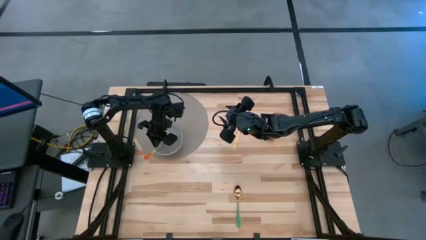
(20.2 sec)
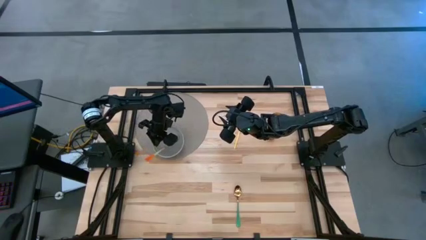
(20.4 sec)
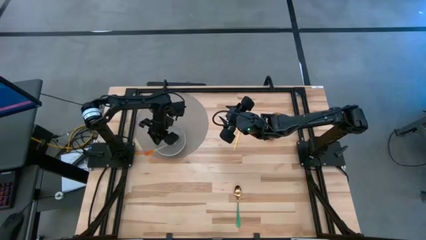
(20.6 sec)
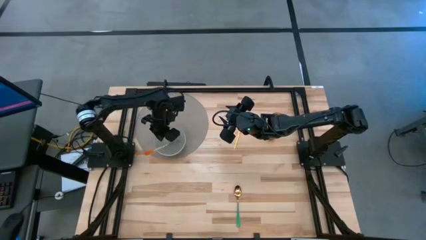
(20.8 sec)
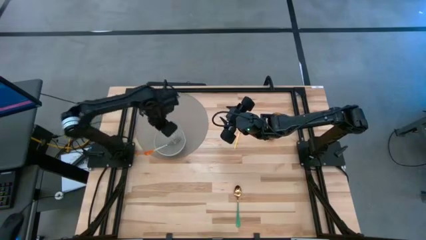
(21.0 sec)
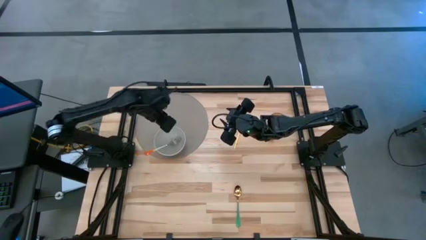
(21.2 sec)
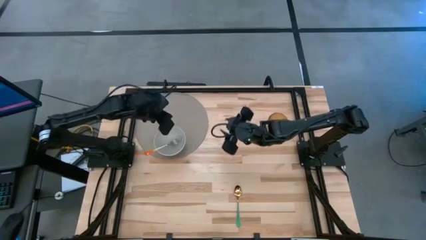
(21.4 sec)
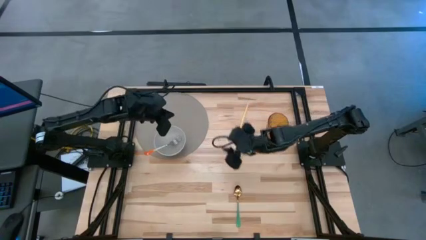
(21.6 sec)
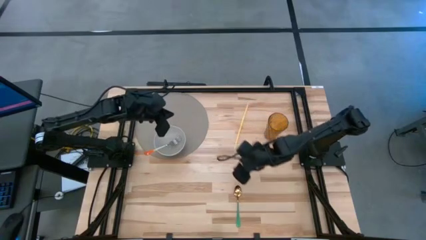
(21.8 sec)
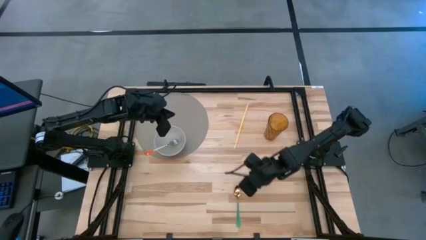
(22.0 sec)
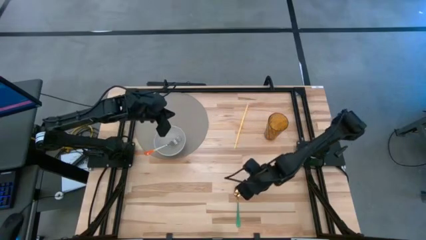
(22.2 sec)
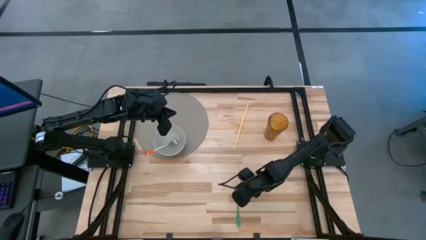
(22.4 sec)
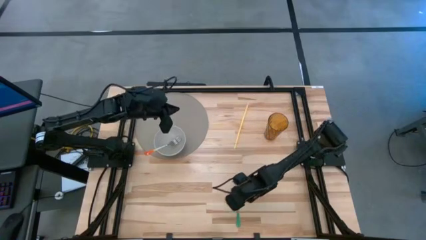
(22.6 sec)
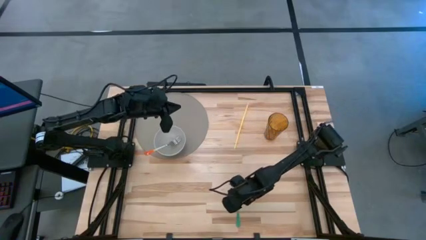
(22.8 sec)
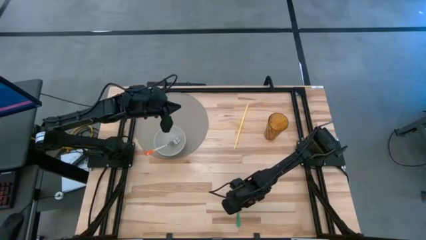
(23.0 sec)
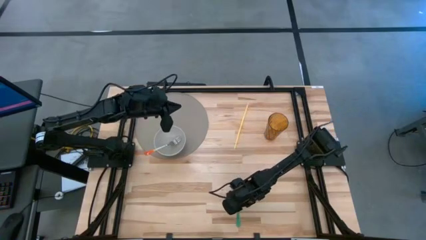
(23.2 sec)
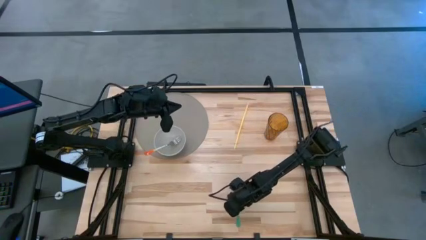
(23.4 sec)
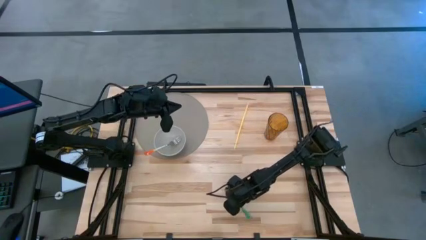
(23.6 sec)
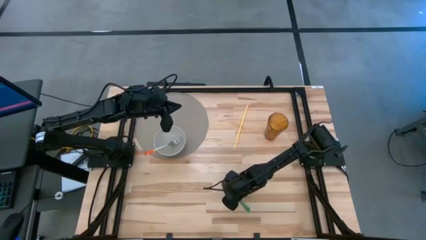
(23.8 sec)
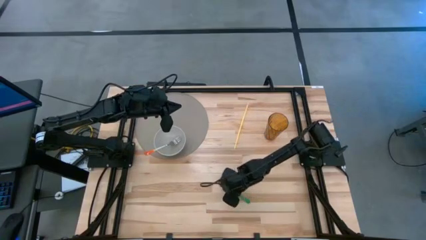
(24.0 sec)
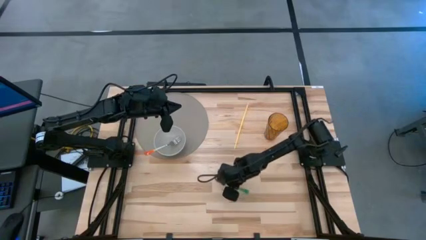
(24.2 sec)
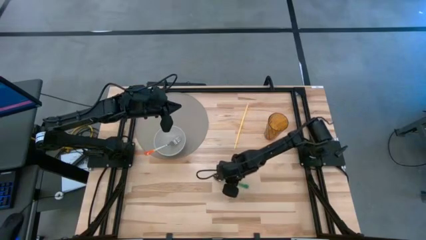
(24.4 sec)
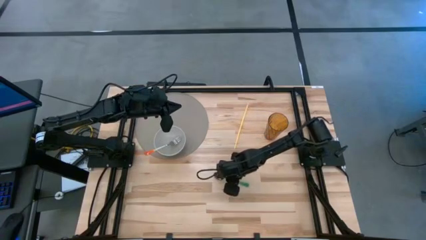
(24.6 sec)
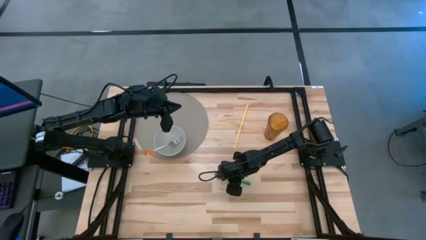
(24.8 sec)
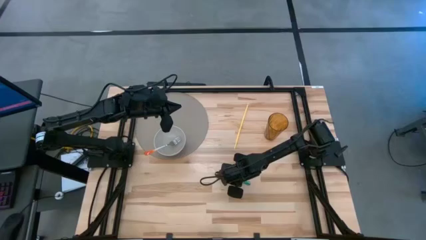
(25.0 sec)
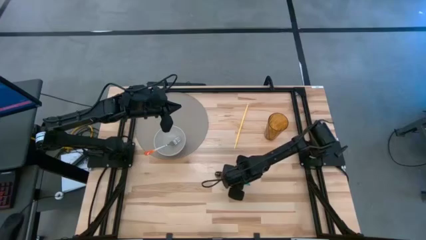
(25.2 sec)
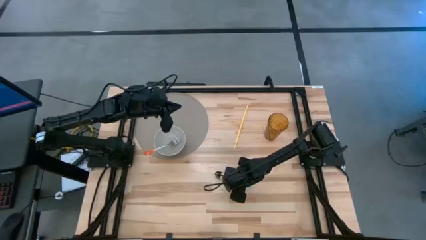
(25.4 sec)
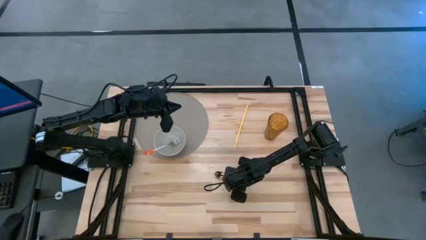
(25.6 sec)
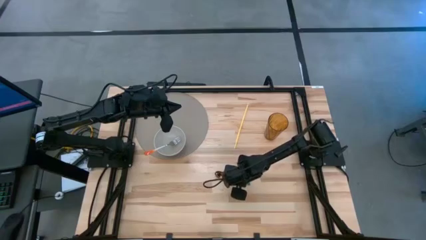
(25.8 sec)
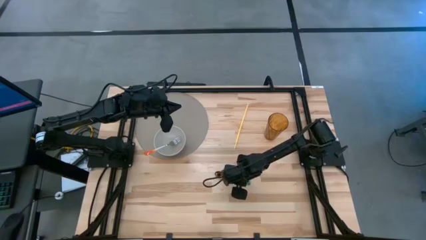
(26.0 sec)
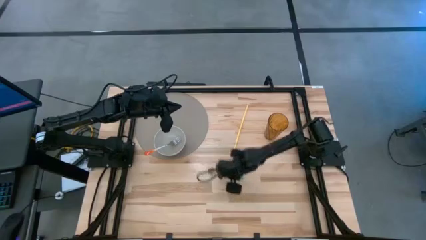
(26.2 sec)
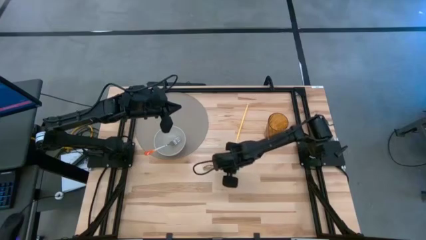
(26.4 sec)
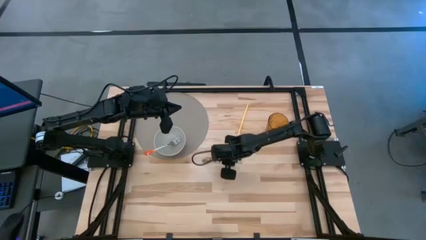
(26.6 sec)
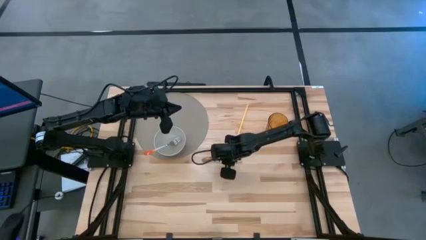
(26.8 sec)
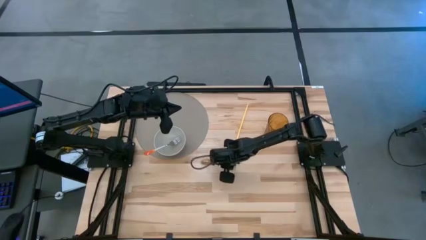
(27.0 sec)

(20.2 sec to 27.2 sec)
Task: Pick & Place Utensil
Put the green spoon into the gray bowl on the gray mat

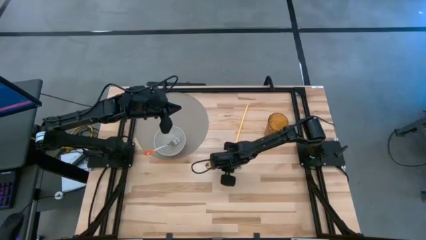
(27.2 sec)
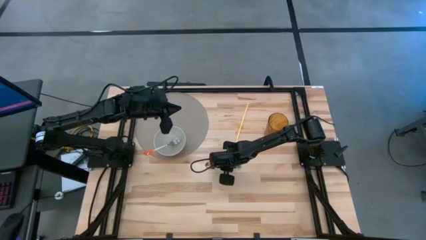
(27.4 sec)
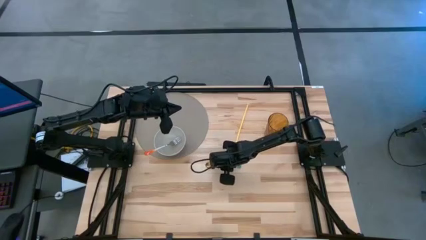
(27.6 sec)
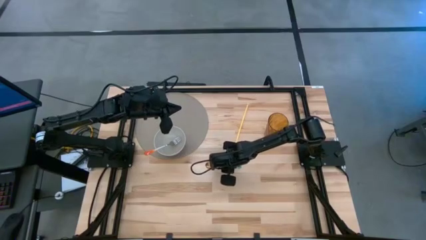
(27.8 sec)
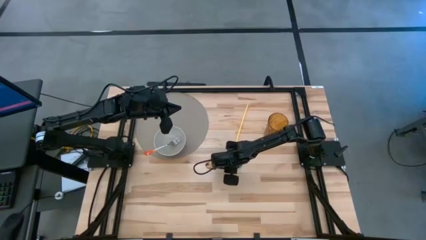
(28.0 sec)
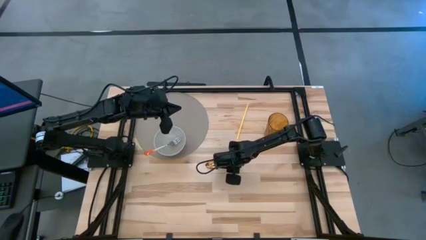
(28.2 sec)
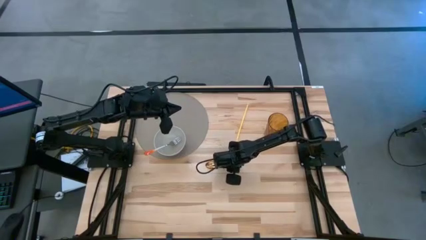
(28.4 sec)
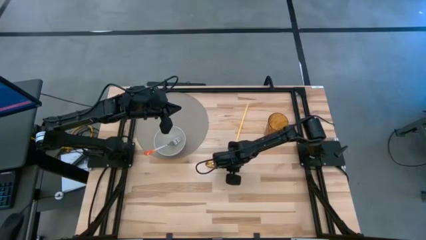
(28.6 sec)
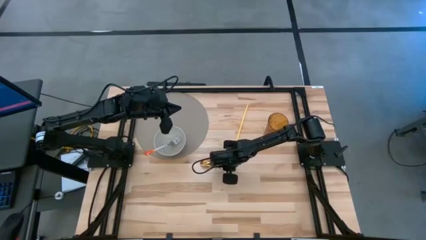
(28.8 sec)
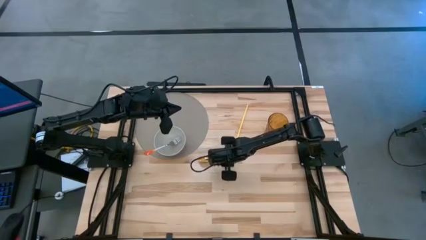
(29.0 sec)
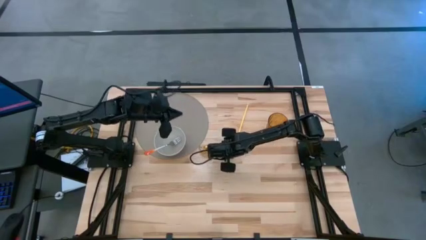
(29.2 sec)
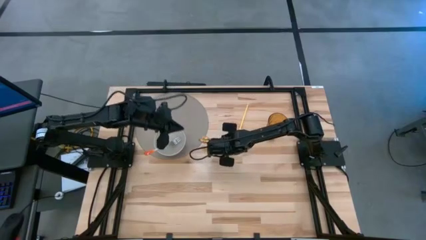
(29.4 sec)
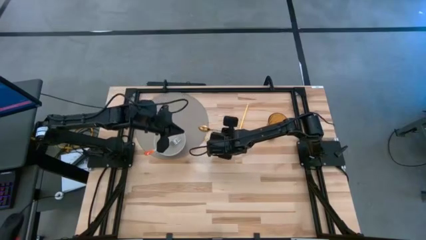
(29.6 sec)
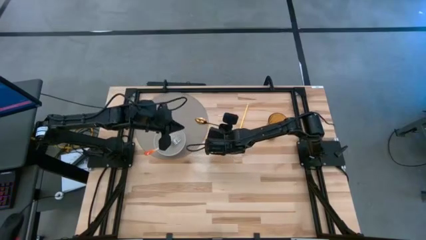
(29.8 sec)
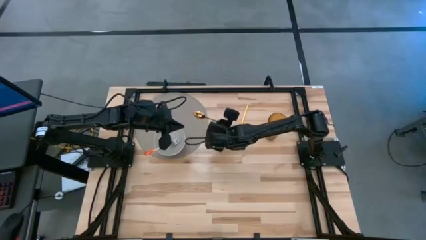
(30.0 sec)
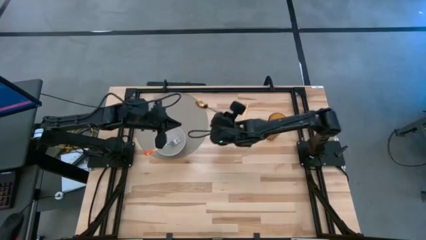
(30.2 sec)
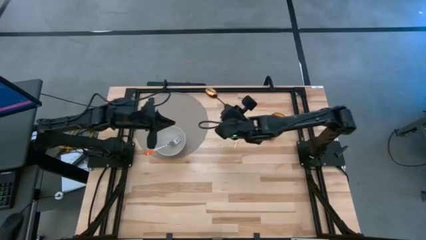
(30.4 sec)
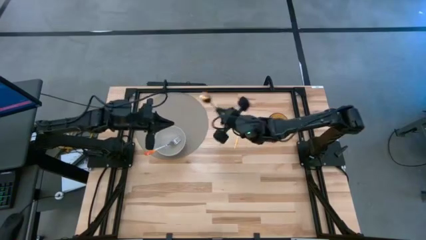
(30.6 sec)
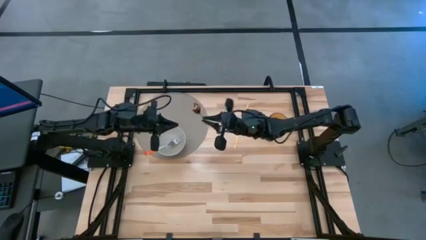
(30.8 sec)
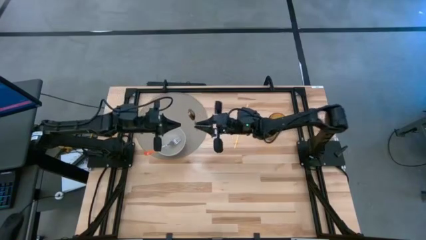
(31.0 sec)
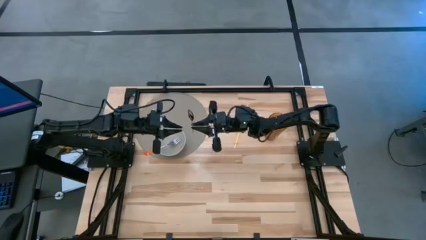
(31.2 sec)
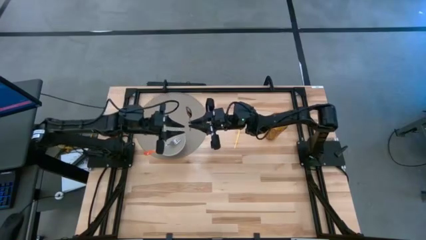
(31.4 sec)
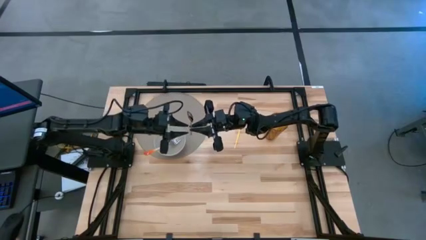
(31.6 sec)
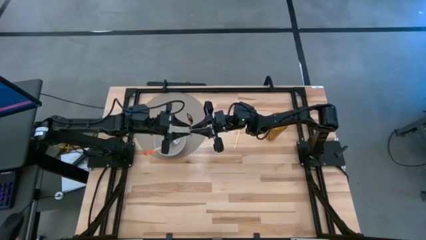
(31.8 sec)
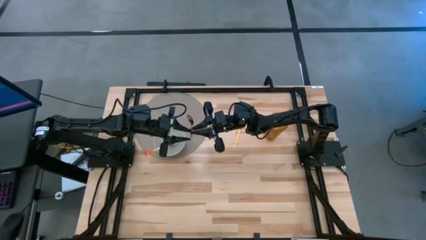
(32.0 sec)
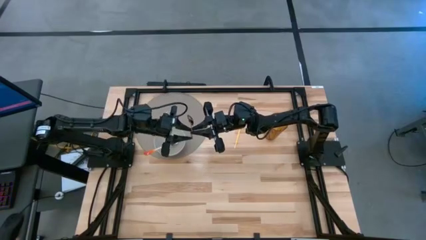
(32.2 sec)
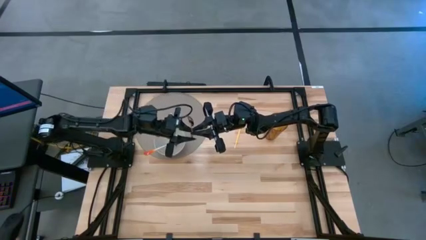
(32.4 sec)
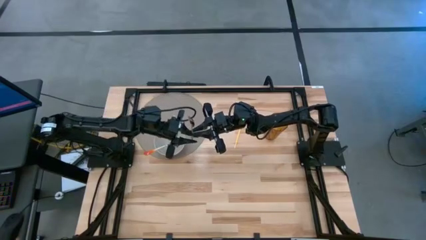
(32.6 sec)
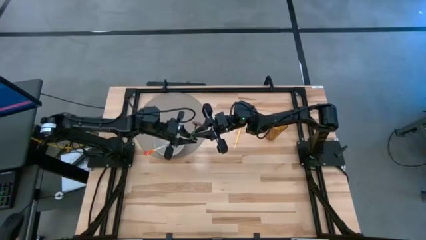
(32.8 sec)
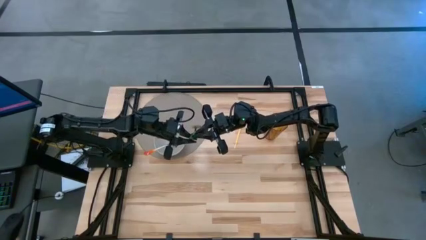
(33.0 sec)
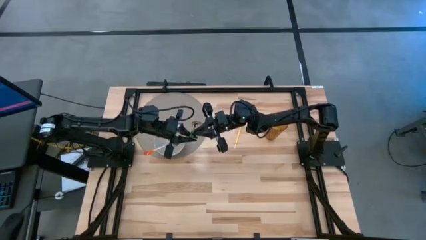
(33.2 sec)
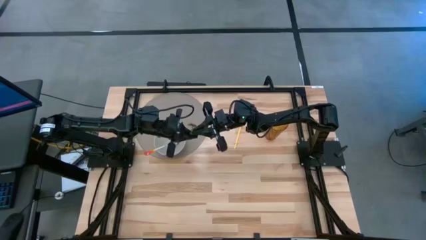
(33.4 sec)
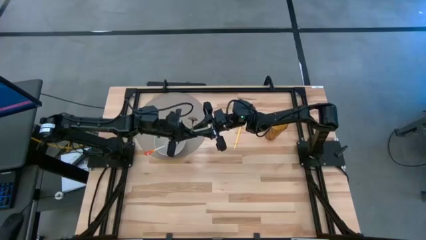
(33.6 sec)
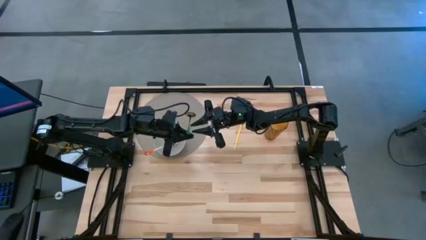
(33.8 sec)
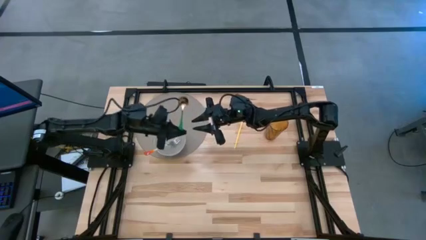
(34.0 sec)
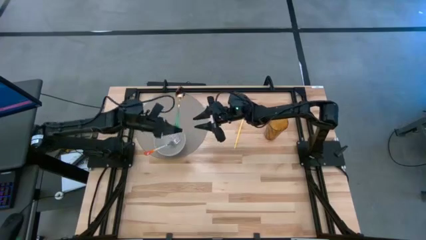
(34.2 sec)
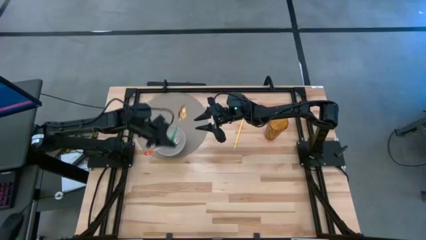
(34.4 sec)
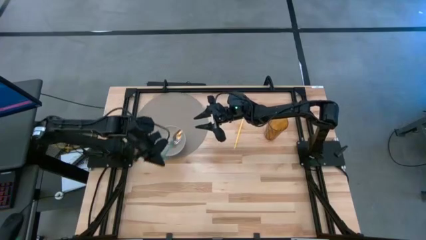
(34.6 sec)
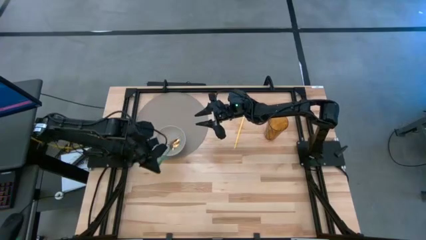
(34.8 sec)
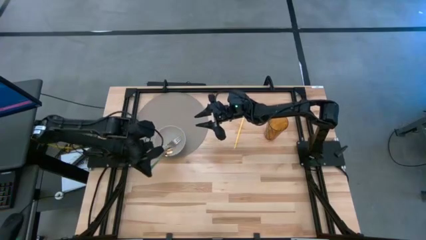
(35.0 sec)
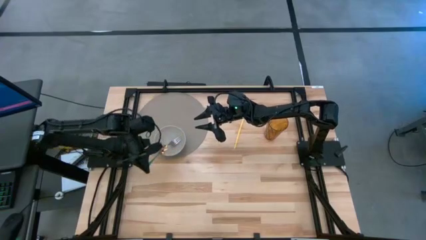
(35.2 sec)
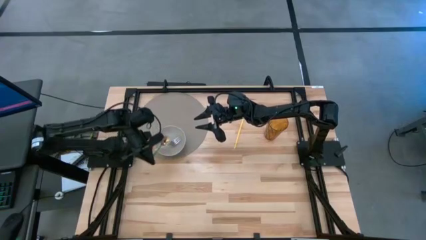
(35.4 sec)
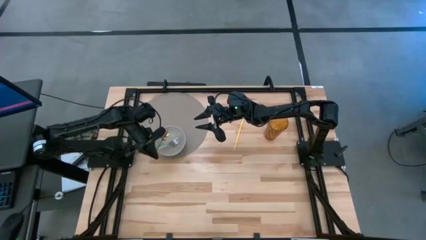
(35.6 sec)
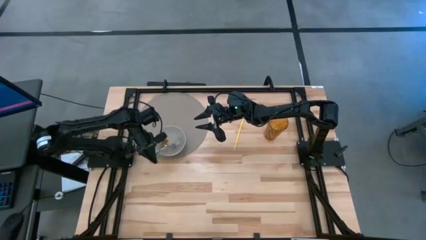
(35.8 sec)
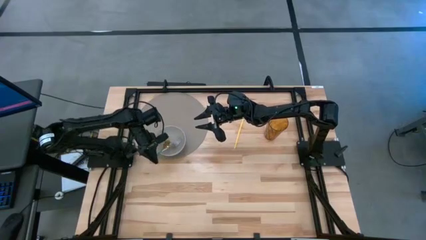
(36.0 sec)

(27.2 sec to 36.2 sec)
Put the green spoon into the gray bowl on the gray mat
